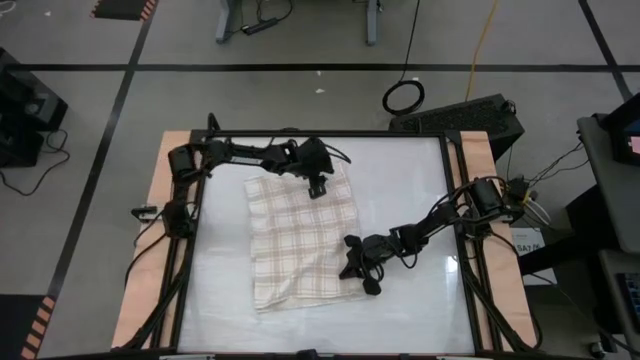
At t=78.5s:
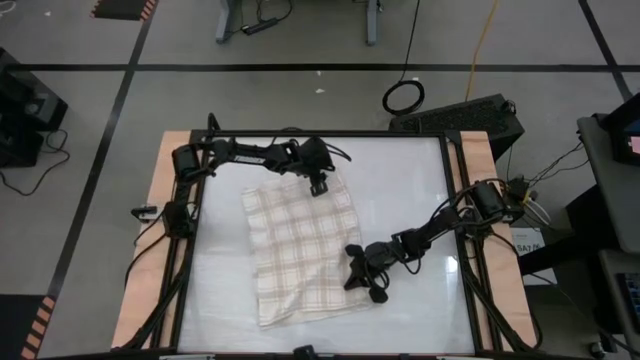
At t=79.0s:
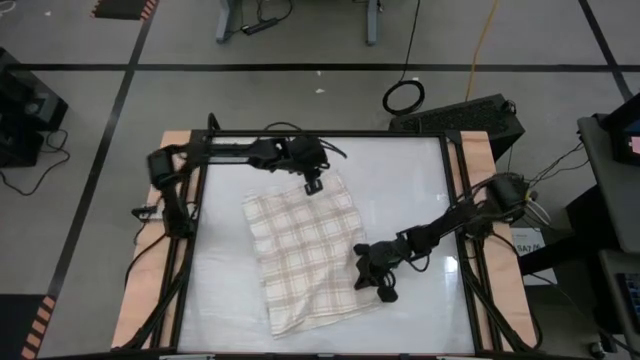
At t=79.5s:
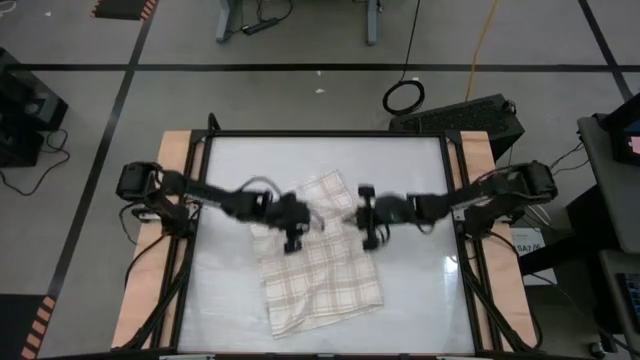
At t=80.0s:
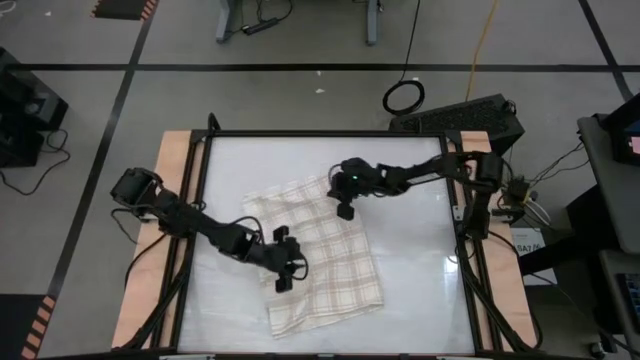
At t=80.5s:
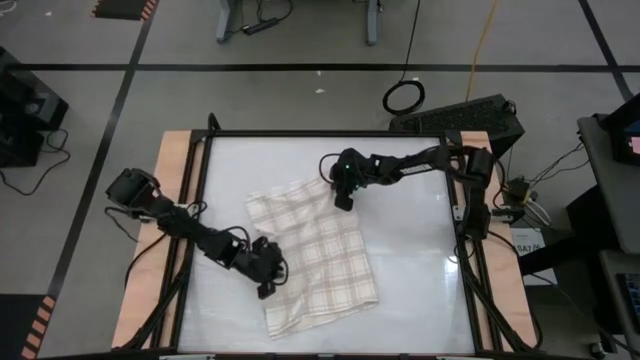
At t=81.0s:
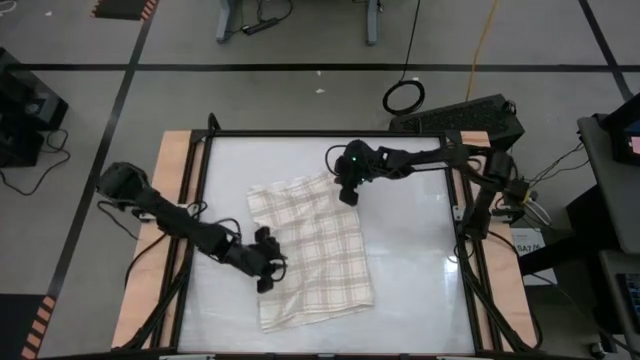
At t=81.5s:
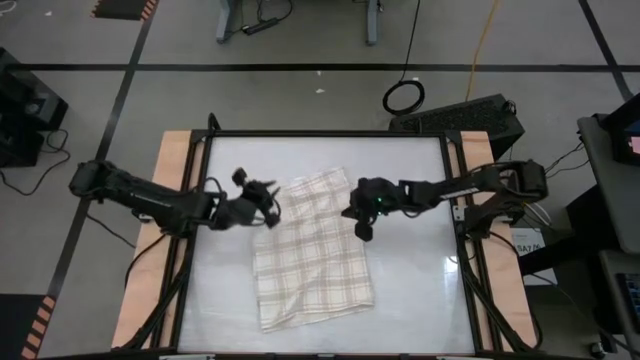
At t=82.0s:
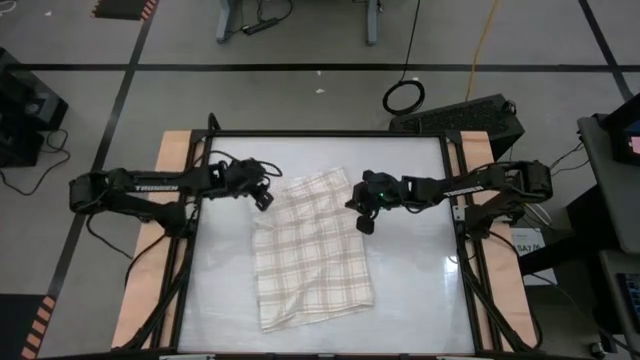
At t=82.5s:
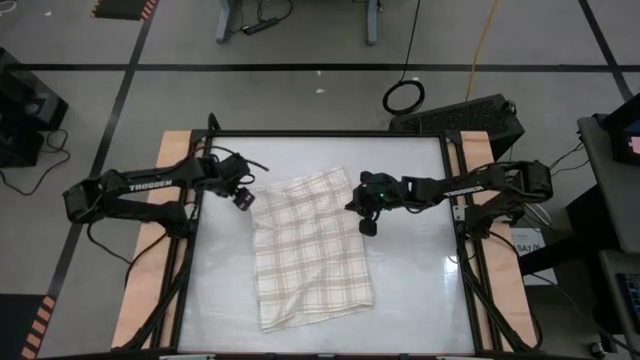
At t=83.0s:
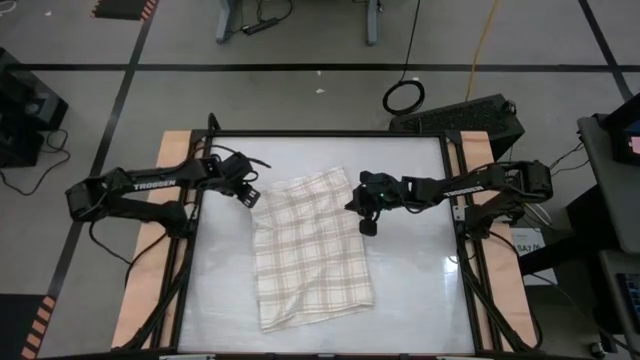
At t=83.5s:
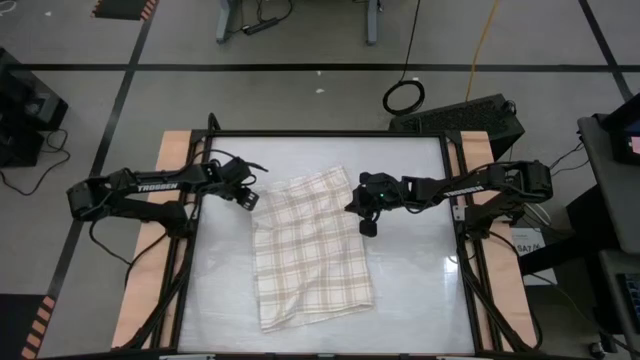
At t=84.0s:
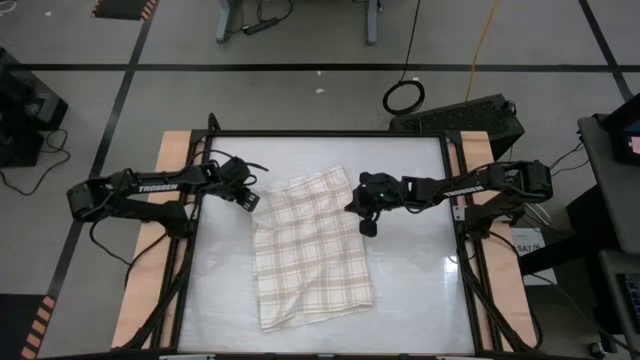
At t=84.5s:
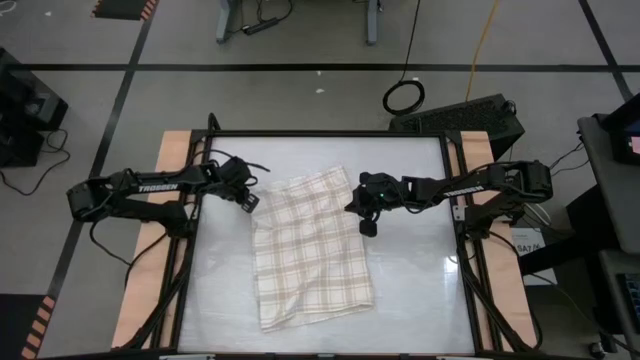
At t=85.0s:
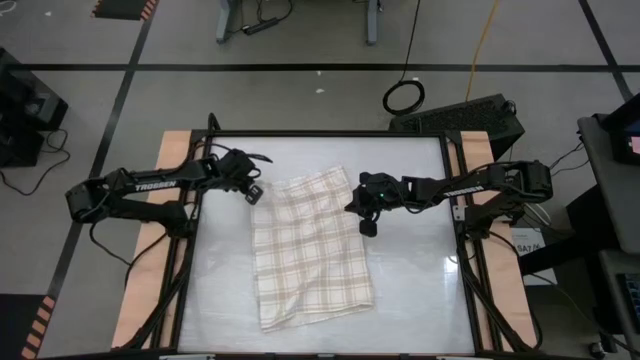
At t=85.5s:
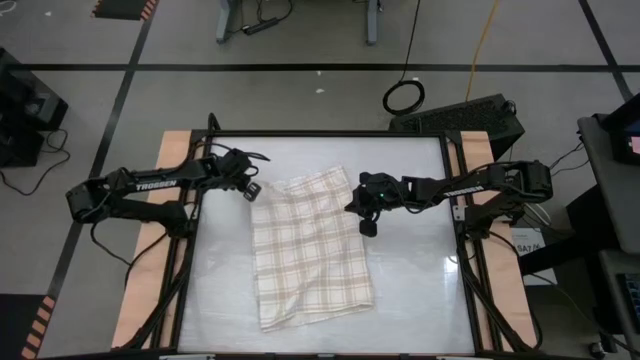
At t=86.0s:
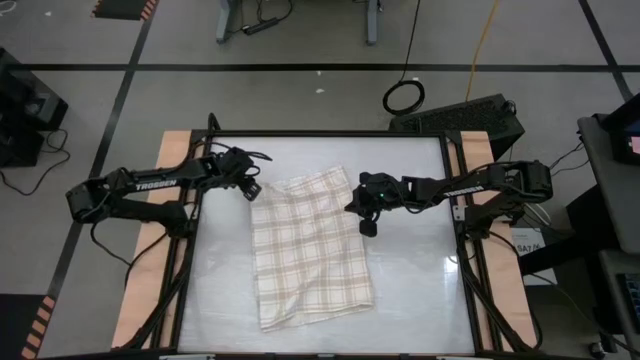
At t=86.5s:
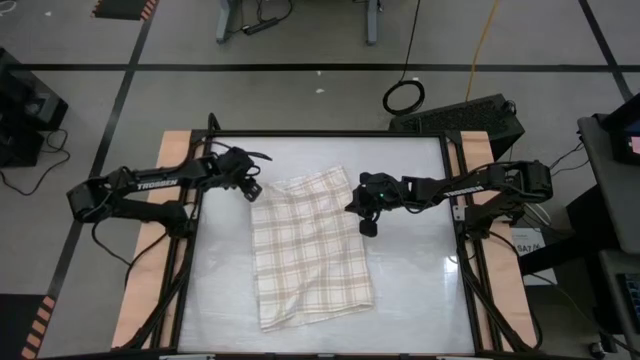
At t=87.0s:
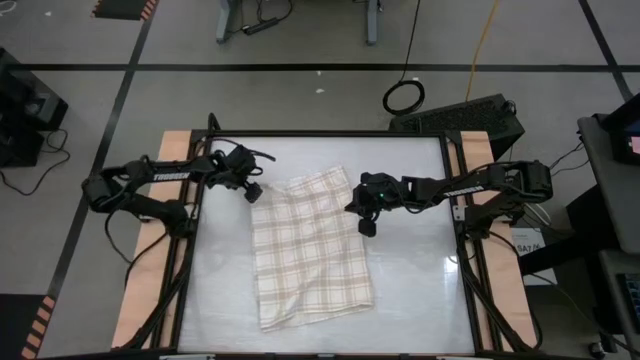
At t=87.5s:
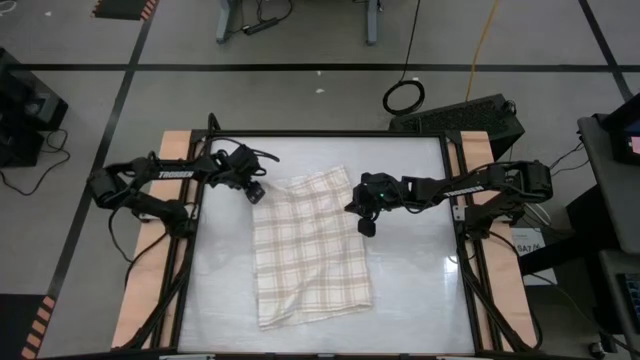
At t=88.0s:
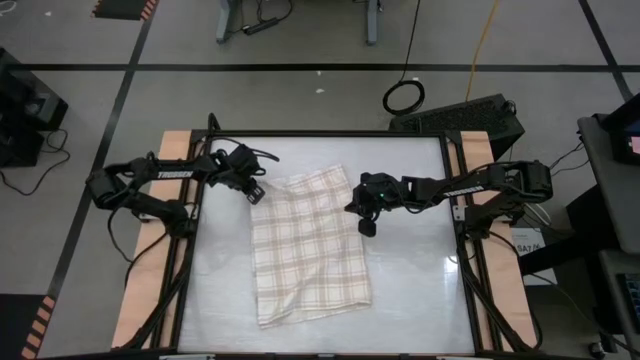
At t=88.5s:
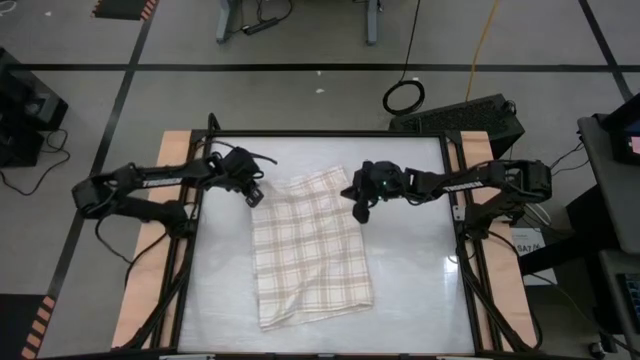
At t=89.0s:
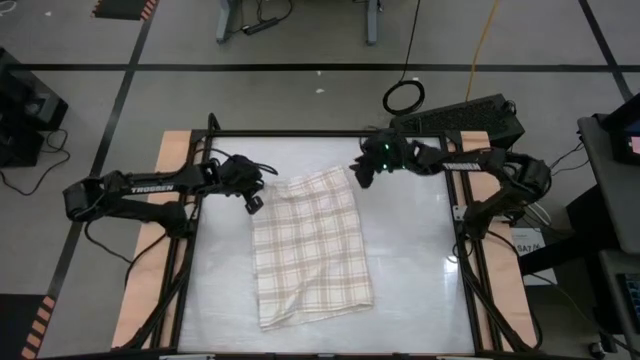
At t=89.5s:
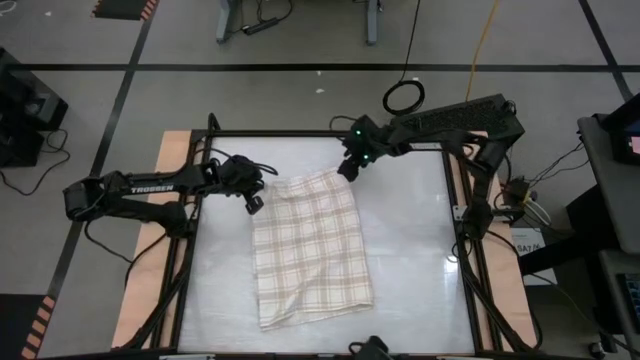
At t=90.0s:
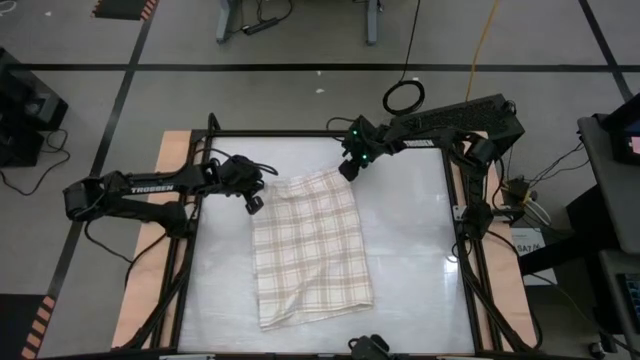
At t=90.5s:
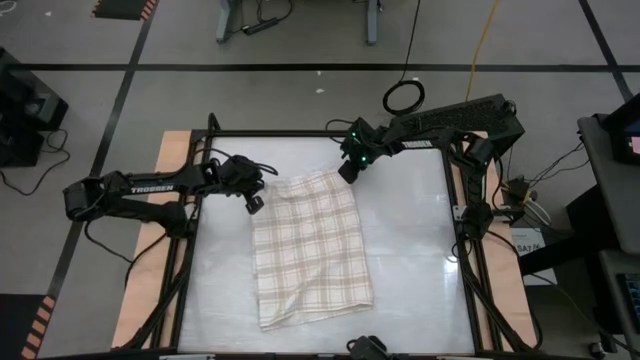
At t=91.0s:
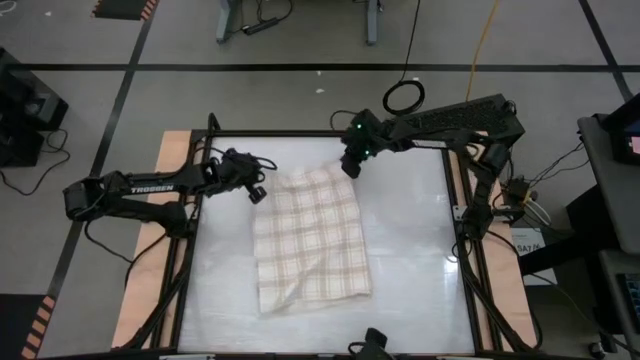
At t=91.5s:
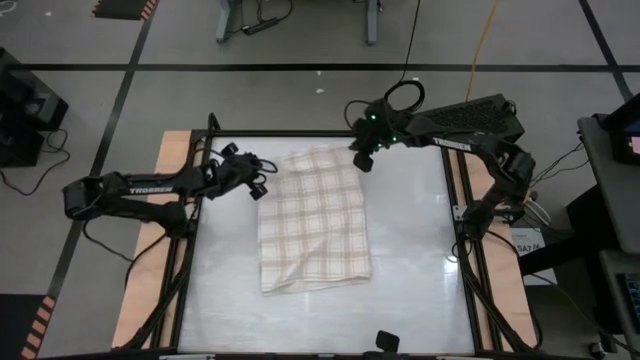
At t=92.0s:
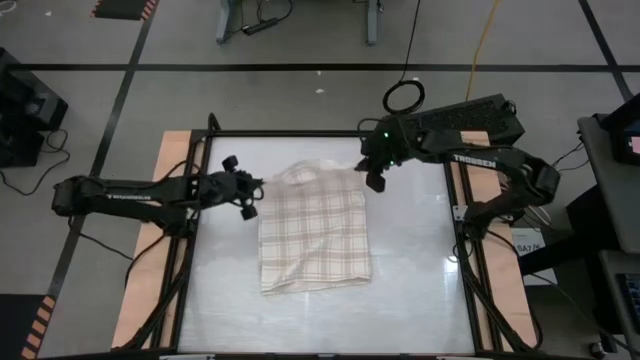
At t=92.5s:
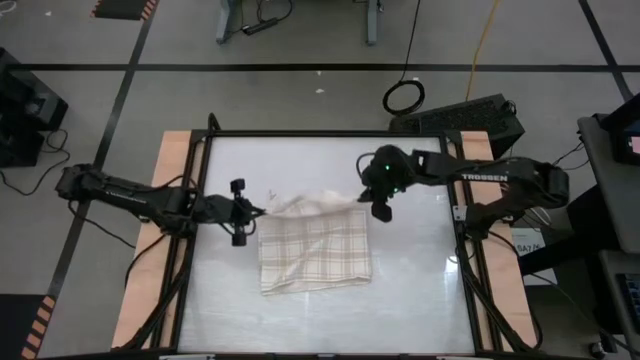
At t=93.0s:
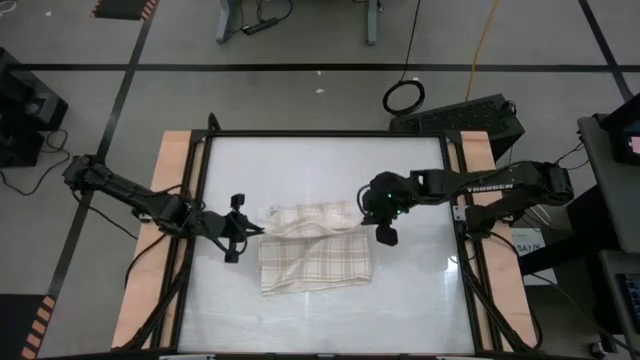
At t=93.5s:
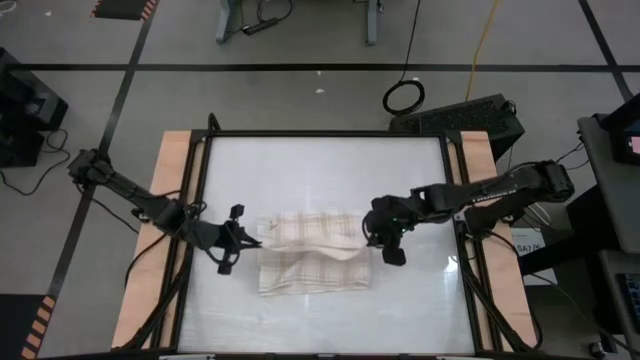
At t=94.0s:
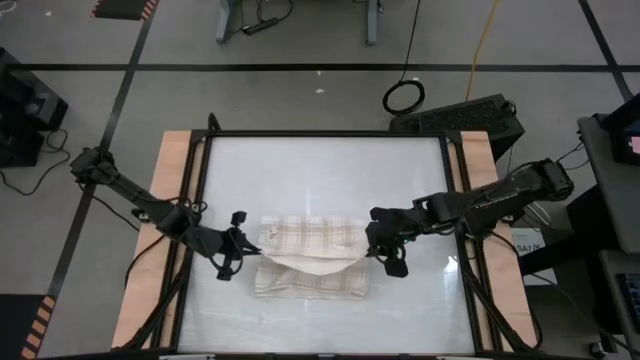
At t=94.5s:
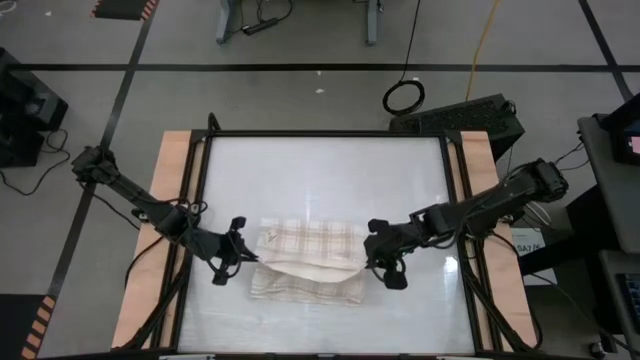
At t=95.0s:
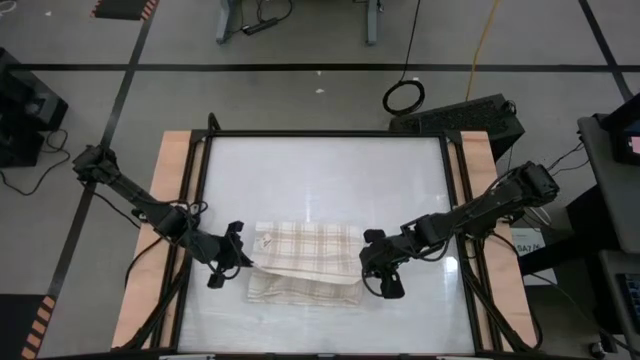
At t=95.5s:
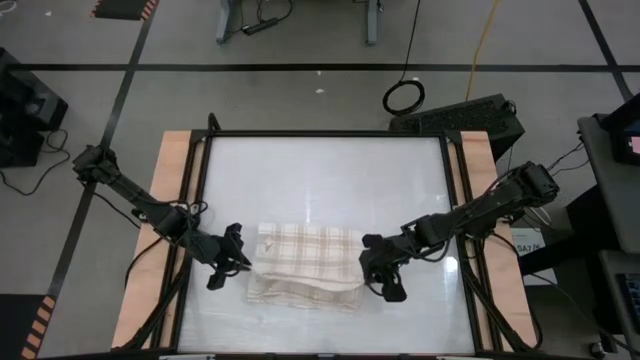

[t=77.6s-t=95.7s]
Task: Roll towel
Roll the white towel

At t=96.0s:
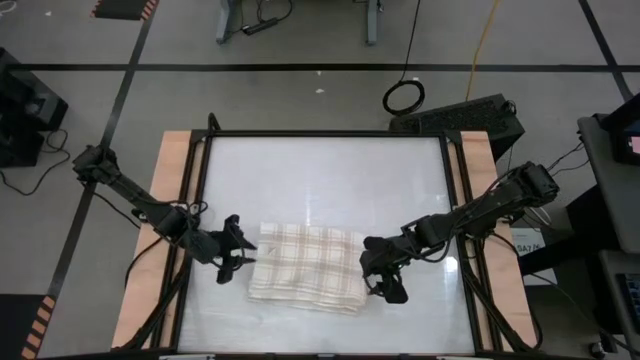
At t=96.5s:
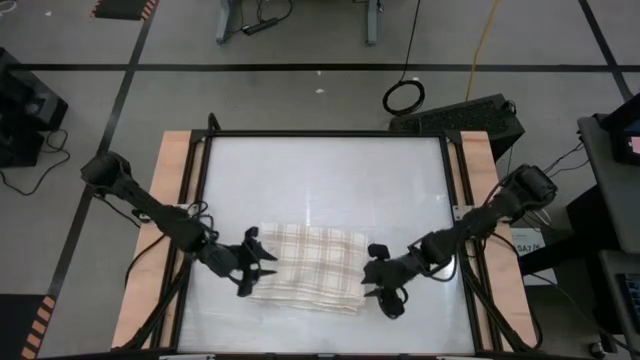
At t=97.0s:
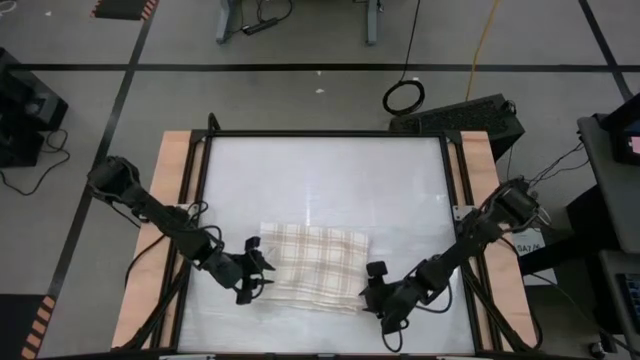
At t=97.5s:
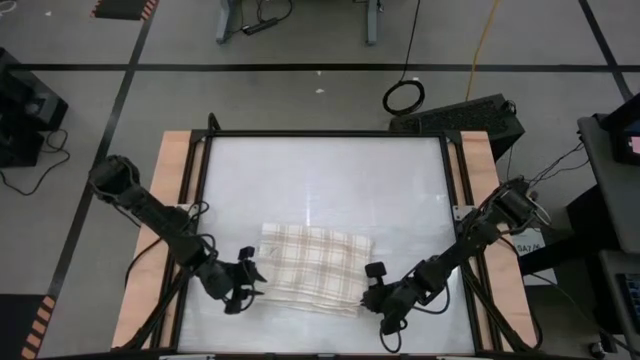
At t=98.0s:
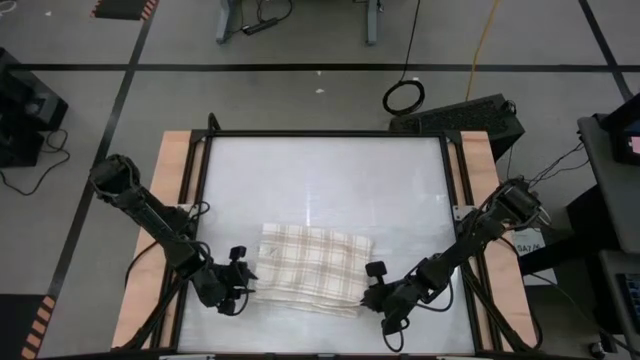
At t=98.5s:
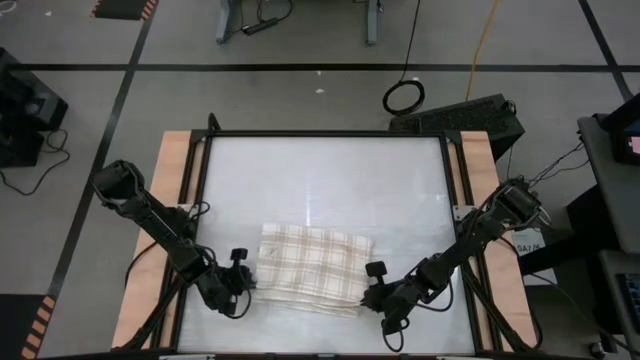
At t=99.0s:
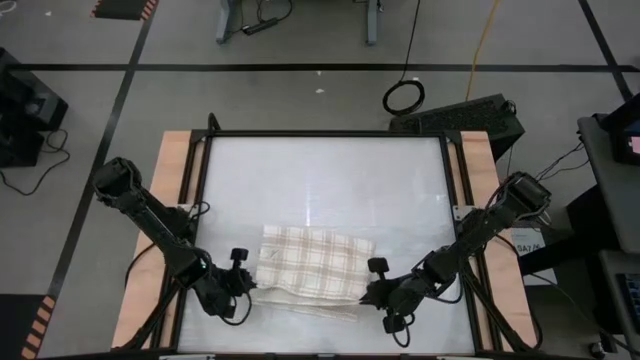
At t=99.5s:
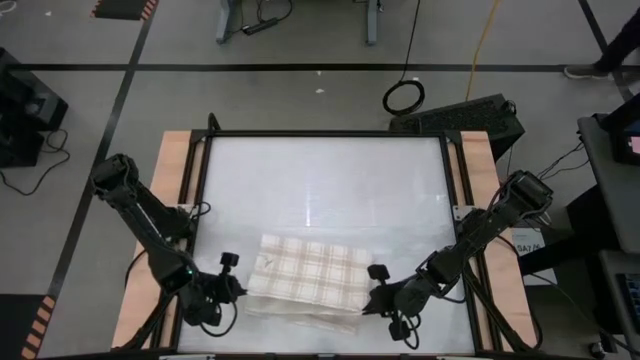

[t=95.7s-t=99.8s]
Roll the white towel
